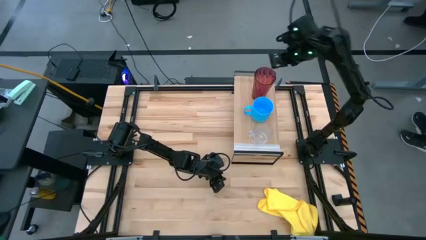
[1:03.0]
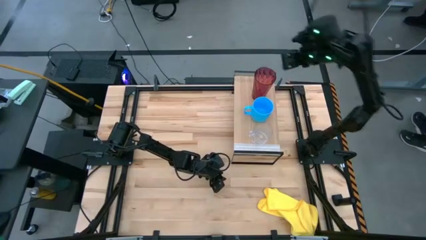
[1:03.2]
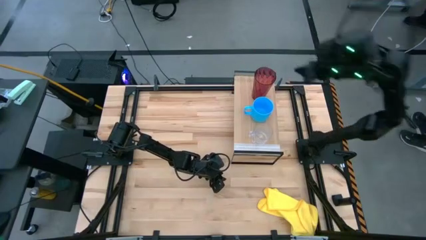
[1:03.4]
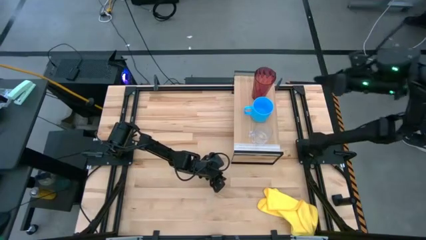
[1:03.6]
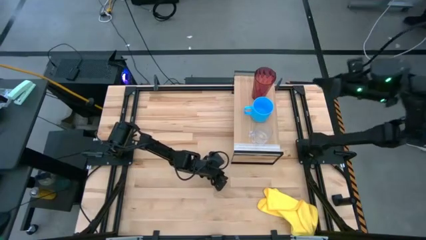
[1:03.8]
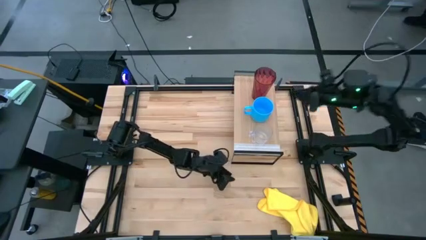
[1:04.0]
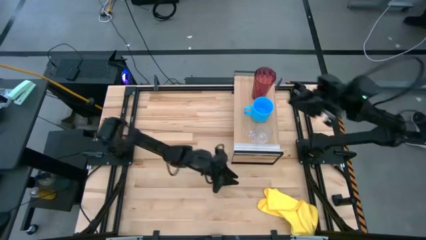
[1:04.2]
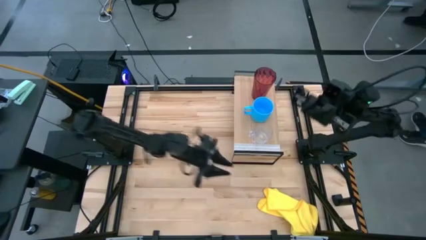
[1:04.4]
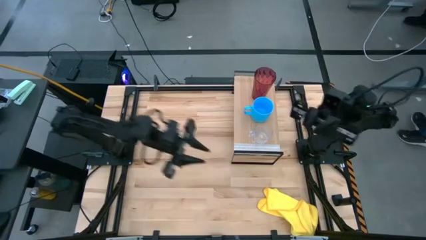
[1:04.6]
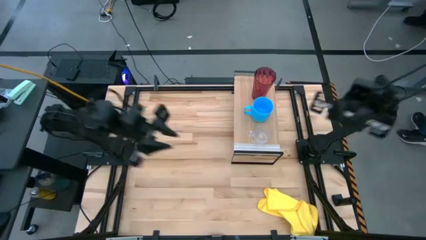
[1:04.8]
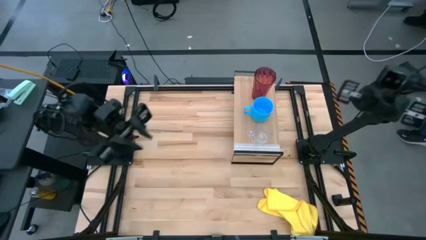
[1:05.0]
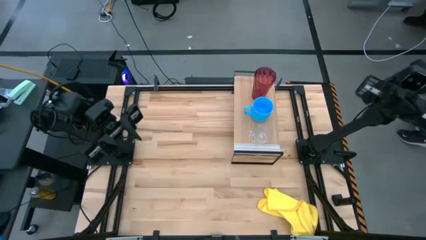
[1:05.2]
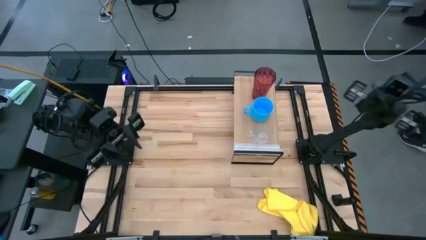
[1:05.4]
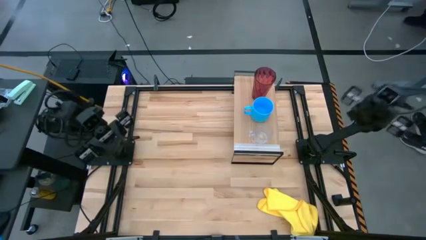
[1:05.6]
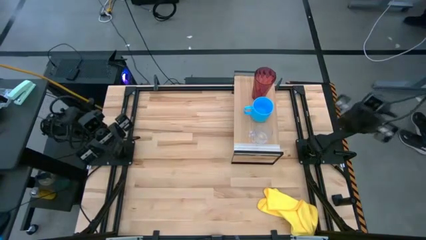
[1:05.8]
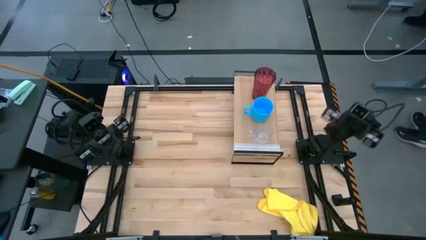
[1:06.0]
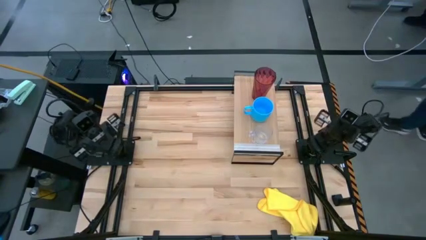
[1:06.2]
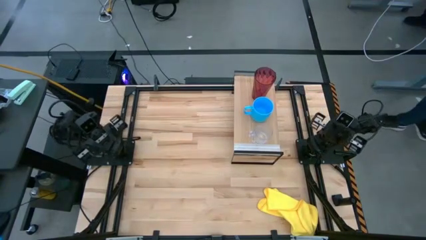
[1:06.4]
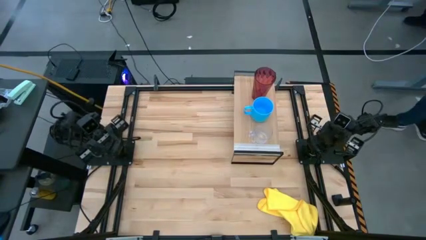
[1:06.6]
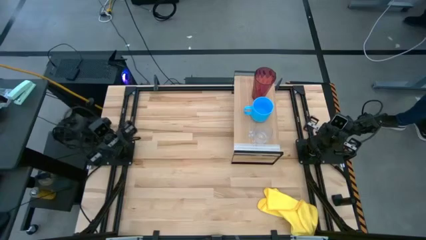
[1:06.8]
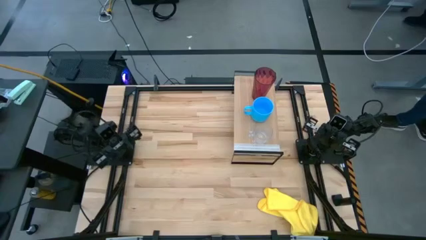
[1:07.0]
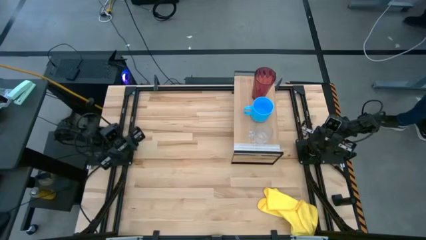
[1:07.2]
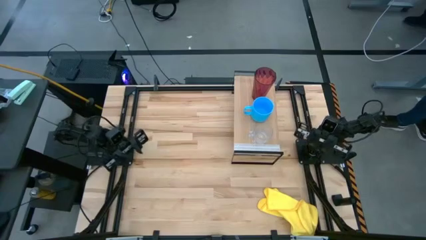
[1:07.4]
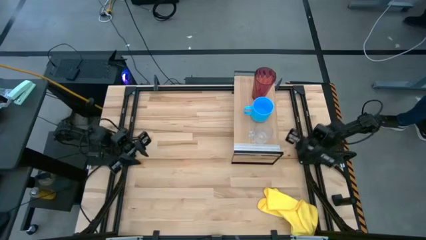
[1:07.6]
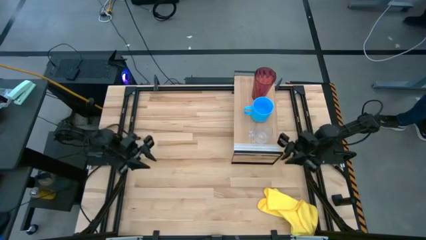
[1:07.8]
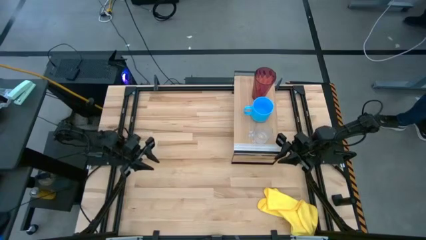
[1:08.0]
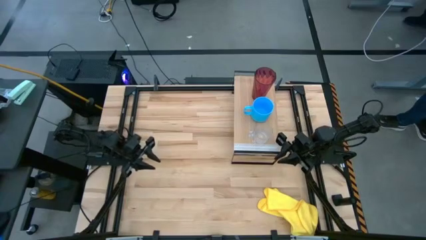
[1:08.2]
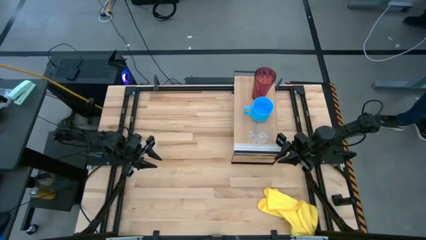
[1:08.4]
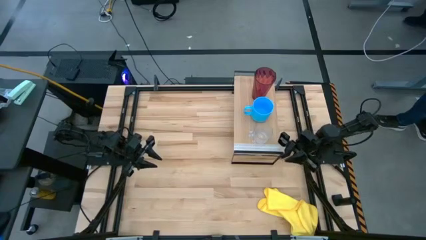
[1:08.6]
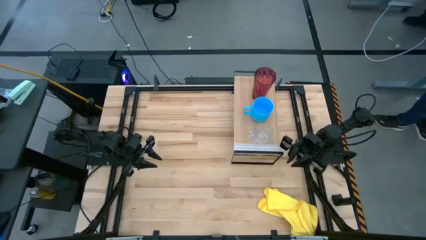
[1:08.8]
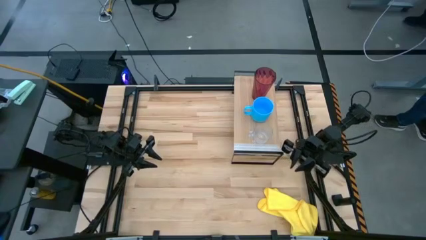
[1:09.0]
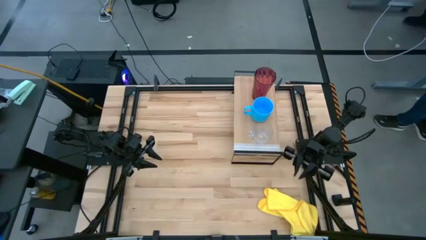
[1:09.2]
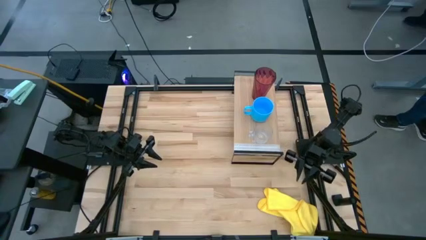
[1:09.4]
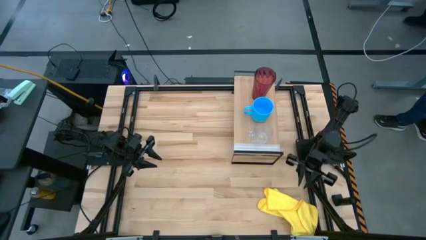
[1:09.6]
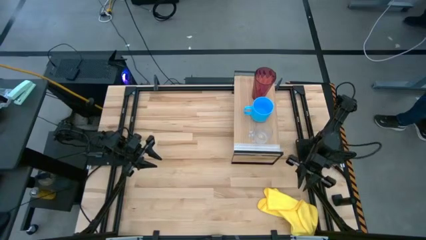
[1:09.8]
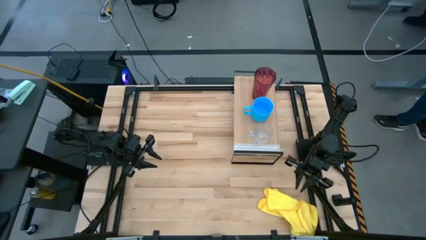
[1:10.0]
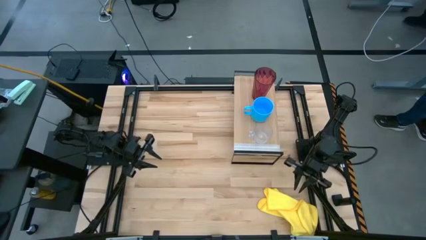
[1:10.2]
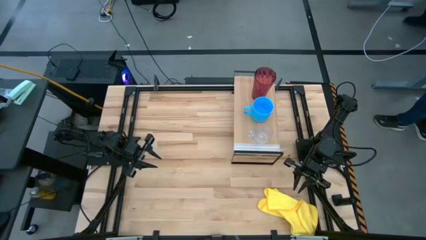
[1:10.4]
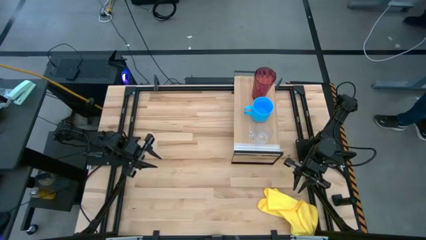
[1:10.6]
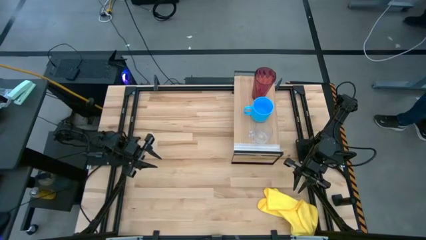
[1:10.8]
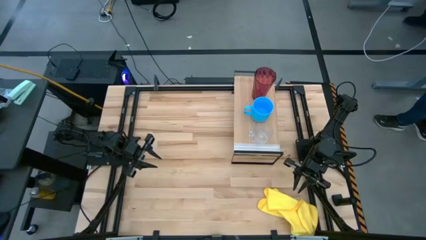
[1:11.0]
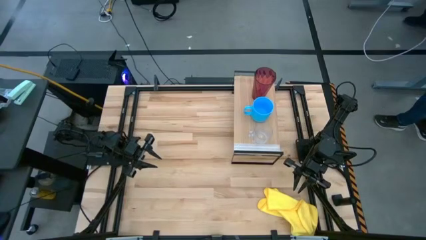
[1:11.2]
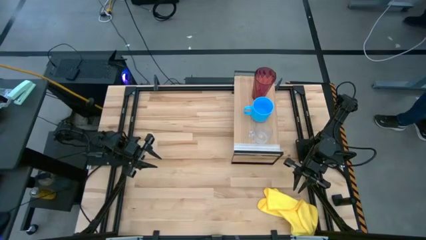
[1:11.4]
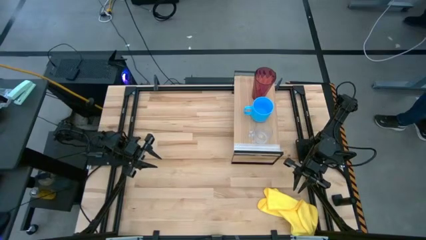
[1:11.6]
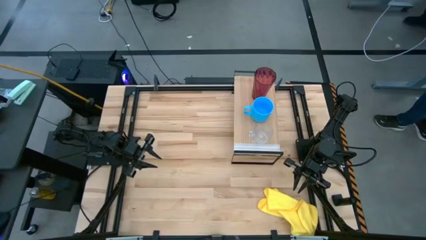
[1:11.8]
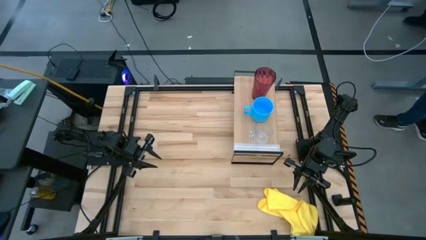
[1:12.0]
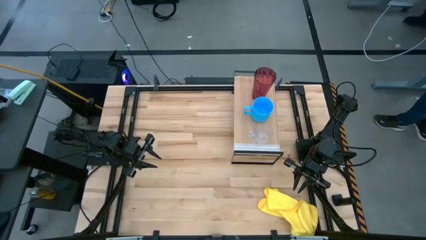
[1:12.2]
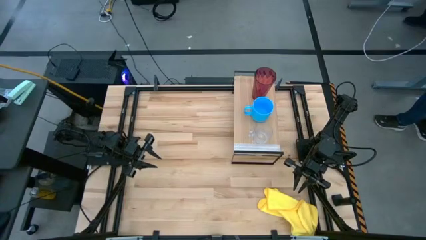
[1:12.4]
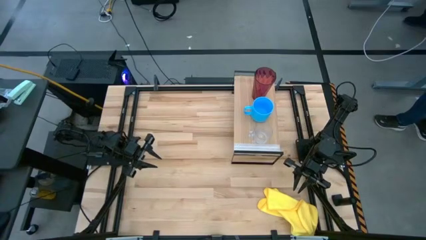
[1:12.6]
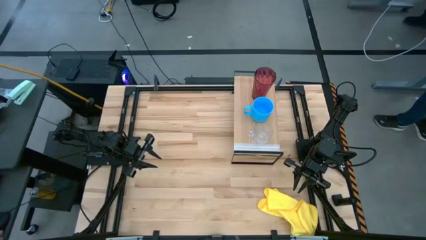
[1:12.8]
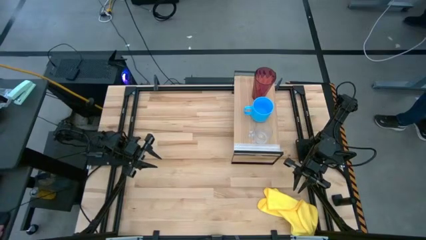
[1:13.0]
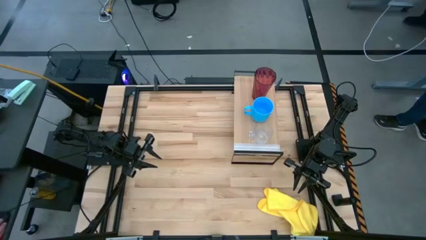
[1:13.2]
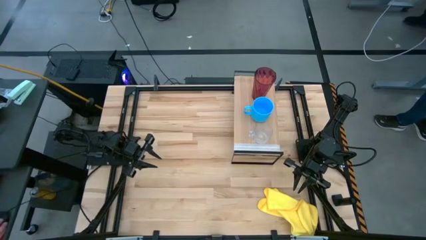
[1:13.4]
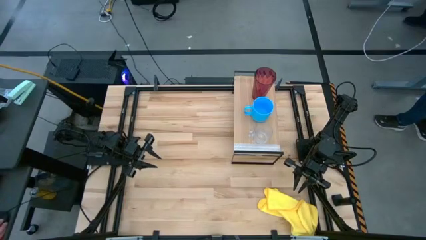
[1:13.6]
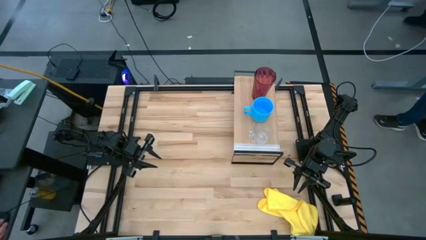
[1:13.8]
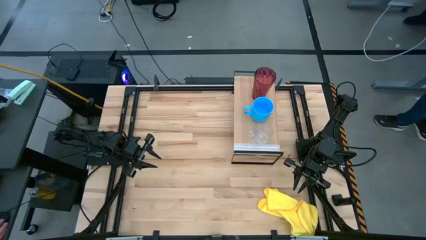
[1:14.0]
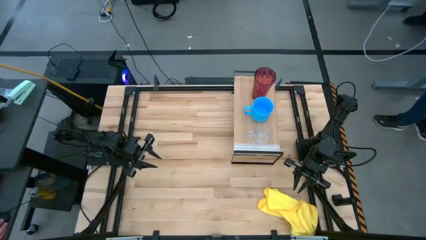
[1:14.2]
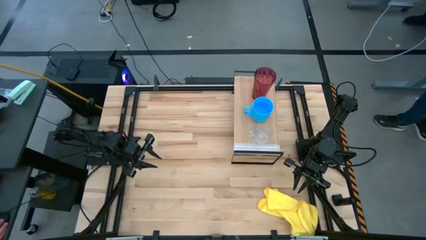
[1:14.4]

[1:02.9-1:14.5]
Task: Stack small to large cups/mugs on shelf
Return to home position
